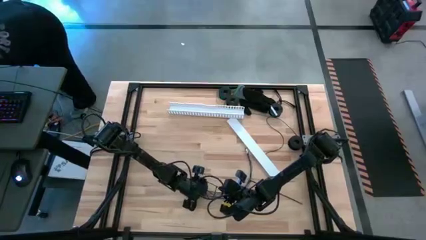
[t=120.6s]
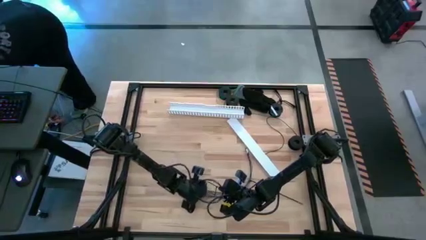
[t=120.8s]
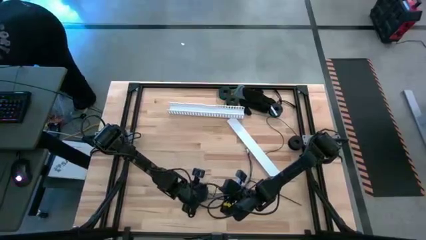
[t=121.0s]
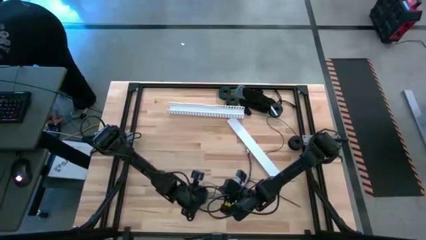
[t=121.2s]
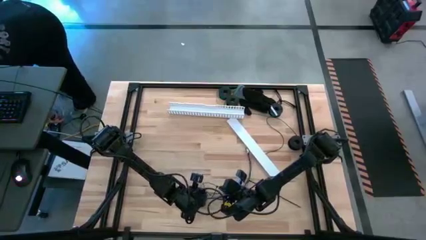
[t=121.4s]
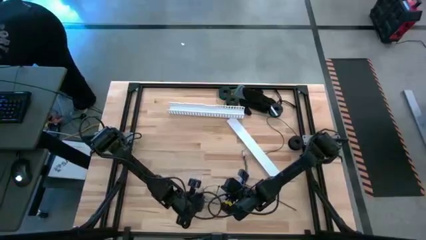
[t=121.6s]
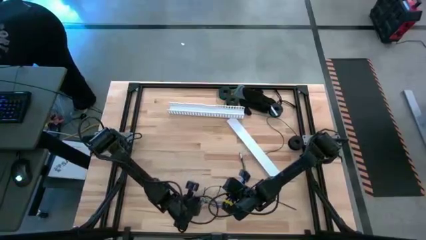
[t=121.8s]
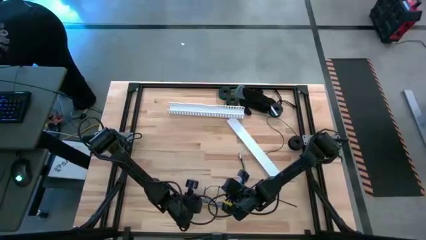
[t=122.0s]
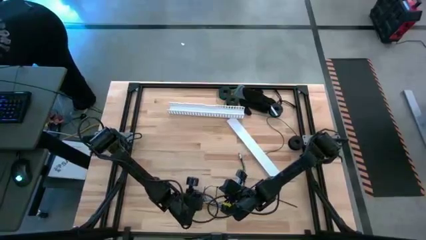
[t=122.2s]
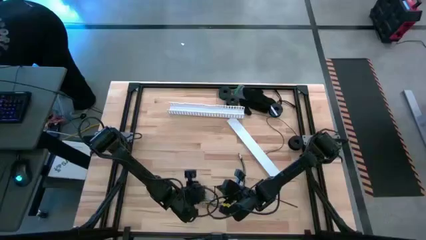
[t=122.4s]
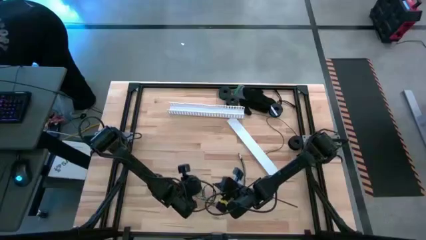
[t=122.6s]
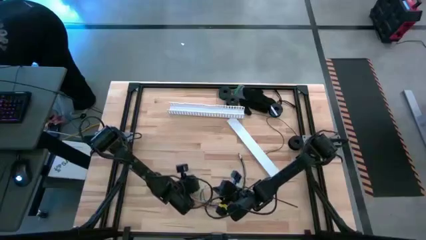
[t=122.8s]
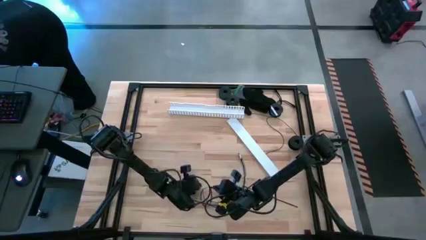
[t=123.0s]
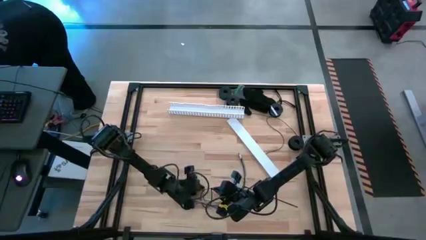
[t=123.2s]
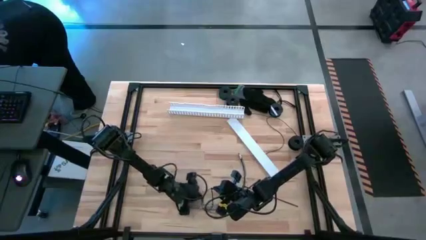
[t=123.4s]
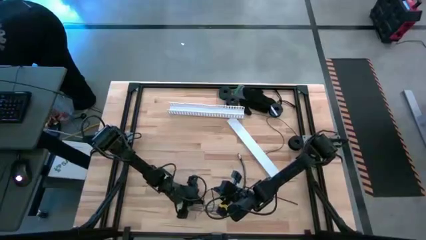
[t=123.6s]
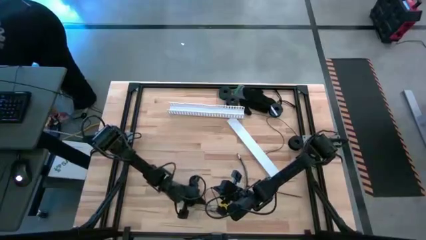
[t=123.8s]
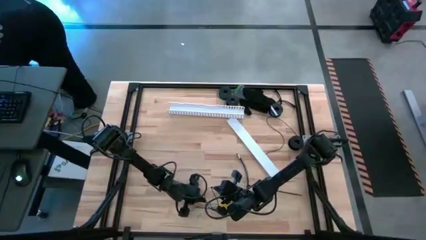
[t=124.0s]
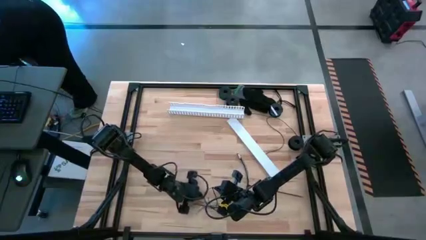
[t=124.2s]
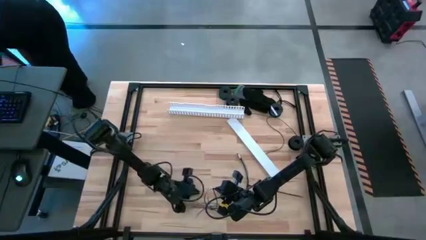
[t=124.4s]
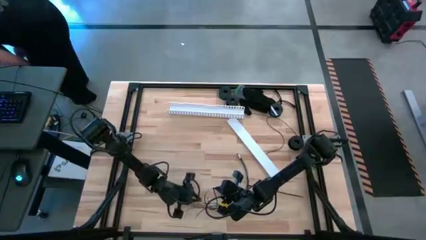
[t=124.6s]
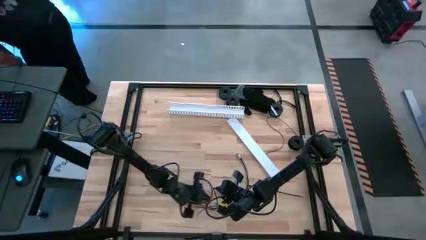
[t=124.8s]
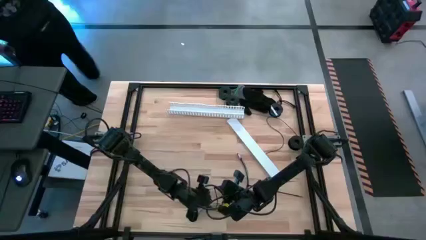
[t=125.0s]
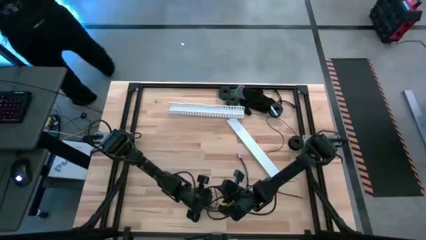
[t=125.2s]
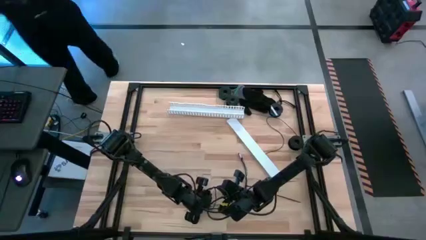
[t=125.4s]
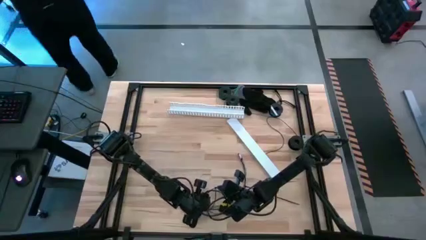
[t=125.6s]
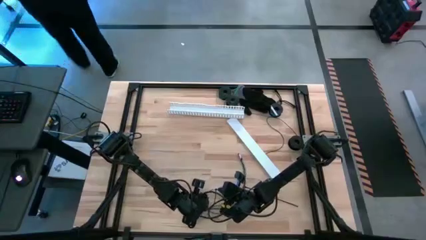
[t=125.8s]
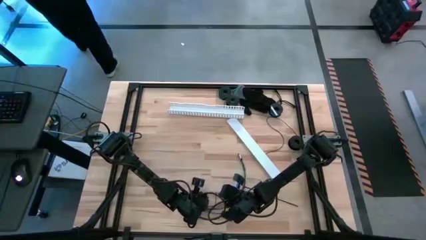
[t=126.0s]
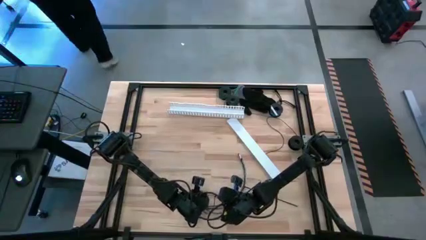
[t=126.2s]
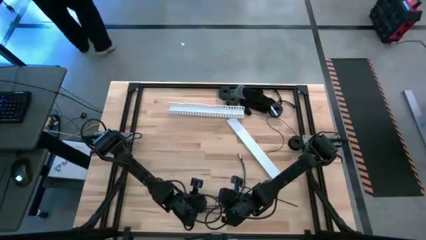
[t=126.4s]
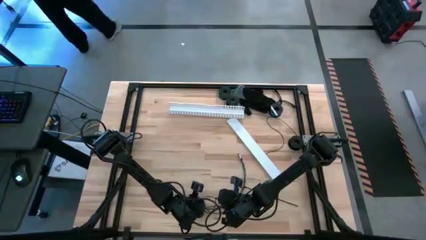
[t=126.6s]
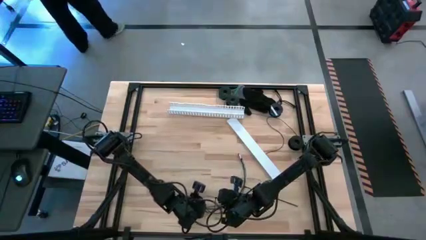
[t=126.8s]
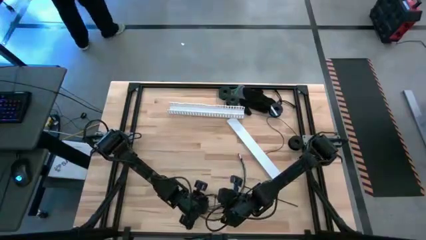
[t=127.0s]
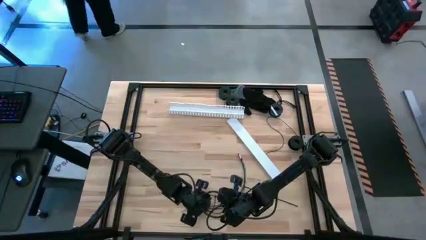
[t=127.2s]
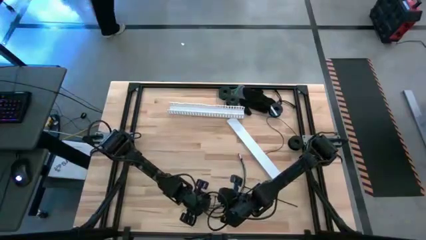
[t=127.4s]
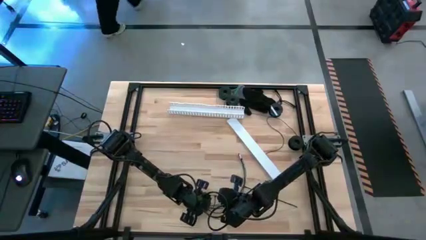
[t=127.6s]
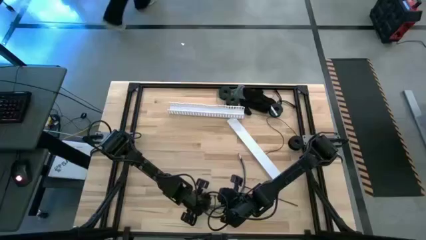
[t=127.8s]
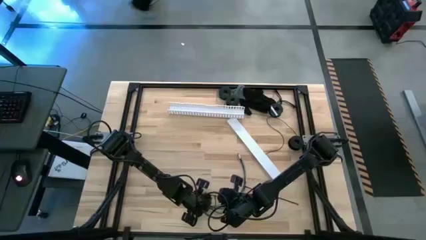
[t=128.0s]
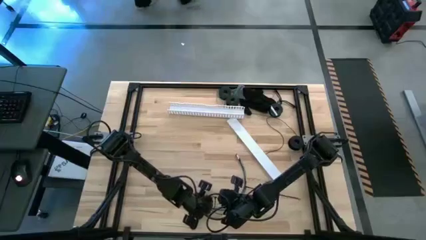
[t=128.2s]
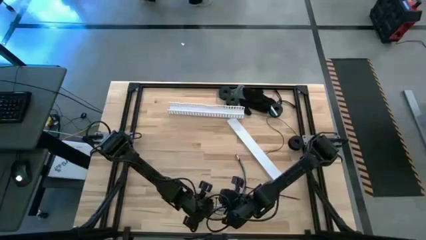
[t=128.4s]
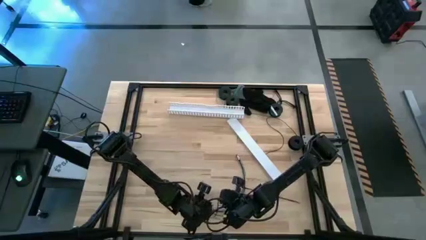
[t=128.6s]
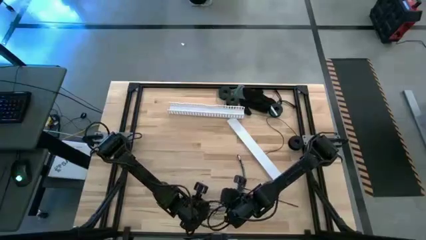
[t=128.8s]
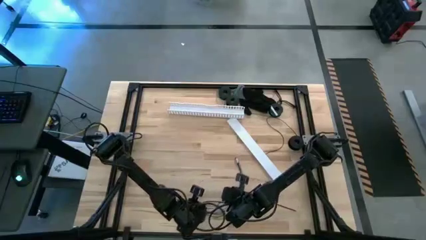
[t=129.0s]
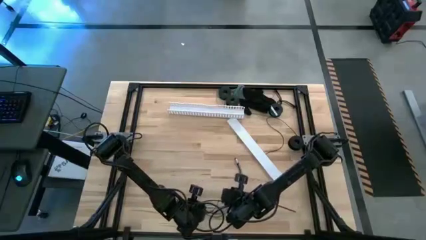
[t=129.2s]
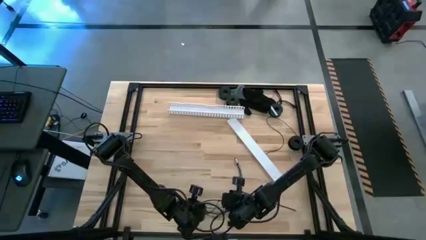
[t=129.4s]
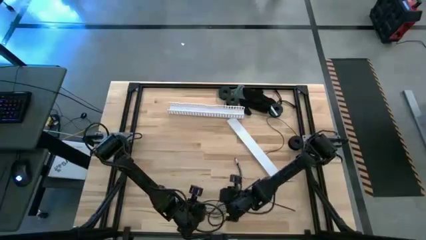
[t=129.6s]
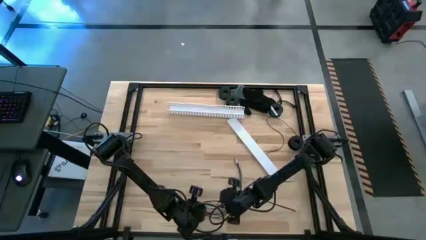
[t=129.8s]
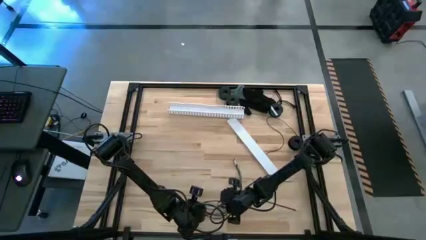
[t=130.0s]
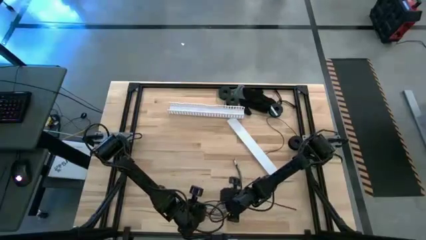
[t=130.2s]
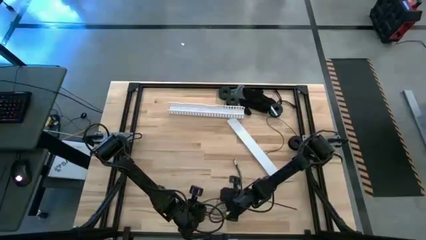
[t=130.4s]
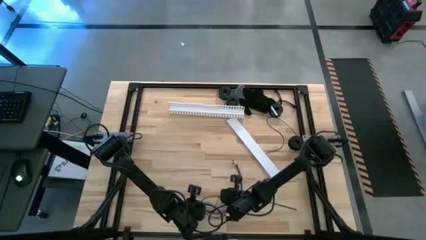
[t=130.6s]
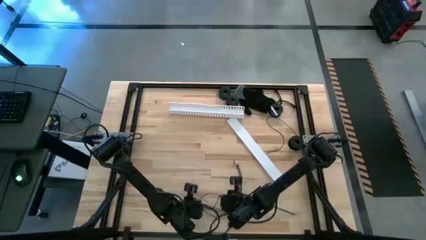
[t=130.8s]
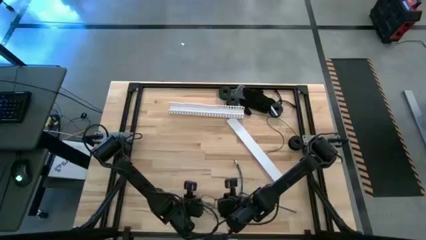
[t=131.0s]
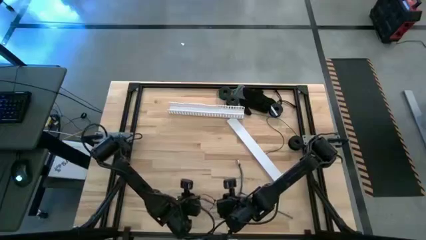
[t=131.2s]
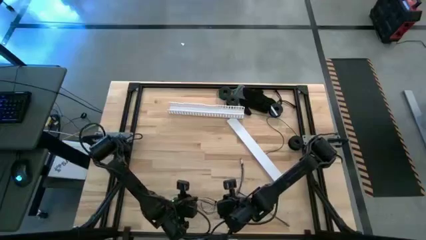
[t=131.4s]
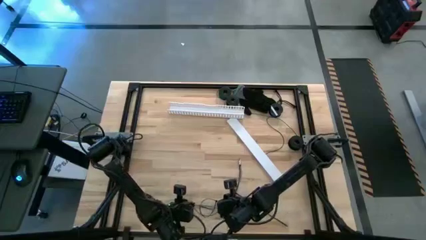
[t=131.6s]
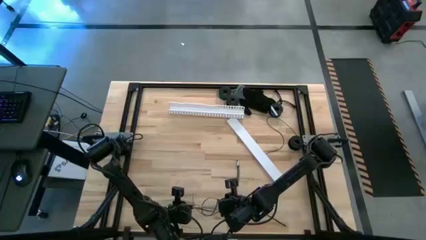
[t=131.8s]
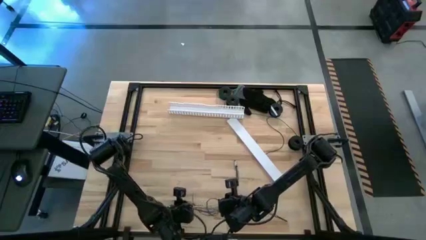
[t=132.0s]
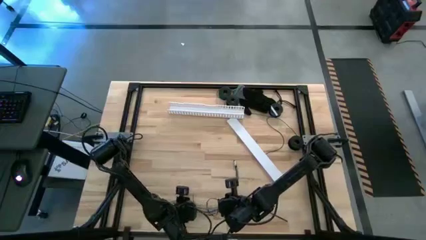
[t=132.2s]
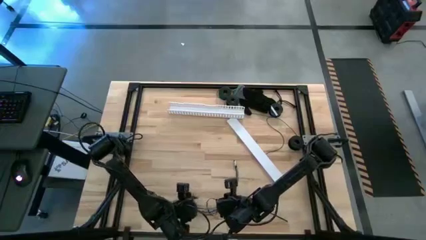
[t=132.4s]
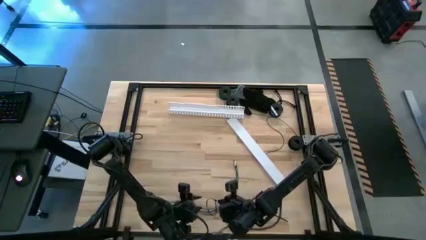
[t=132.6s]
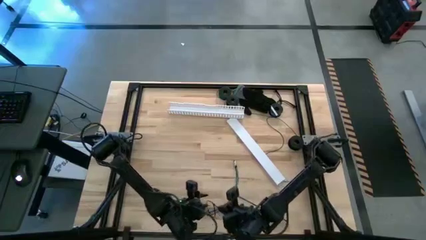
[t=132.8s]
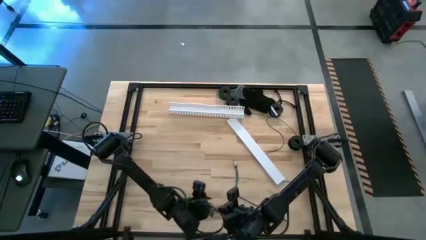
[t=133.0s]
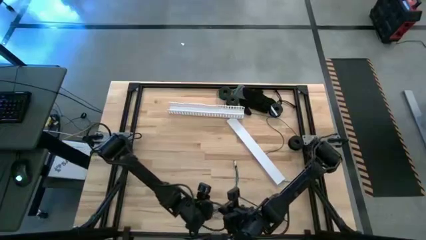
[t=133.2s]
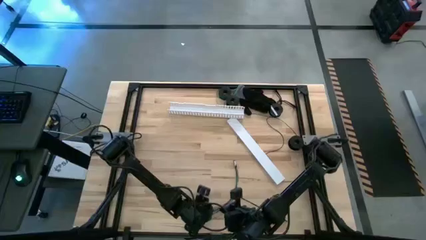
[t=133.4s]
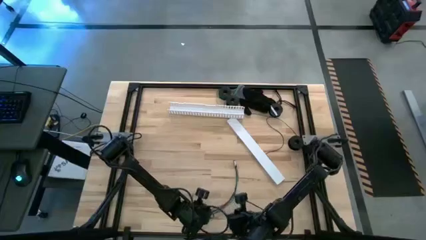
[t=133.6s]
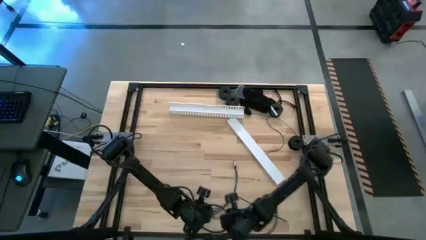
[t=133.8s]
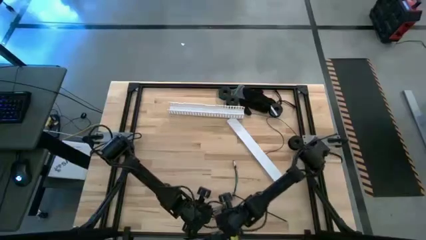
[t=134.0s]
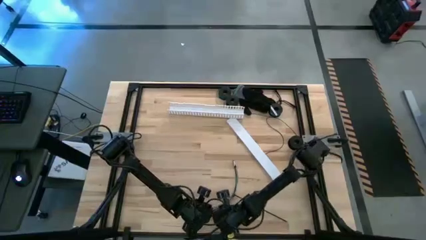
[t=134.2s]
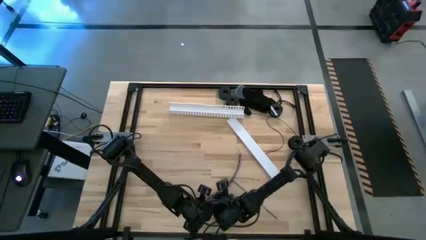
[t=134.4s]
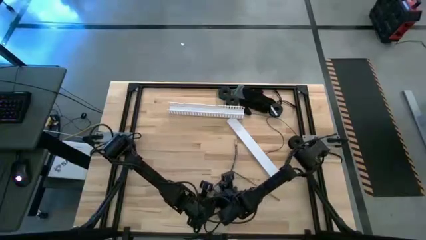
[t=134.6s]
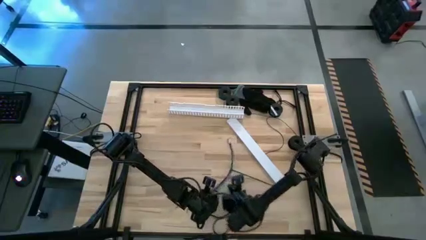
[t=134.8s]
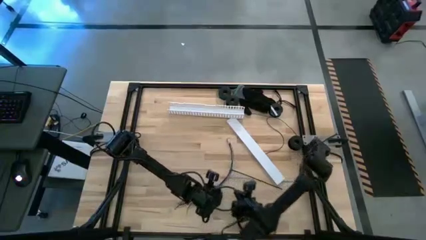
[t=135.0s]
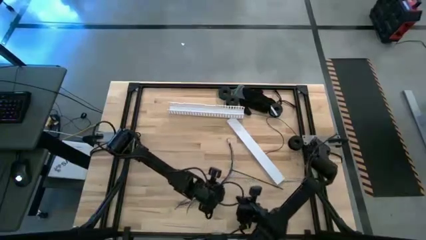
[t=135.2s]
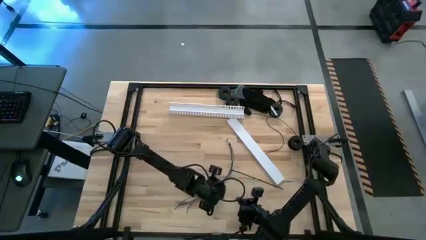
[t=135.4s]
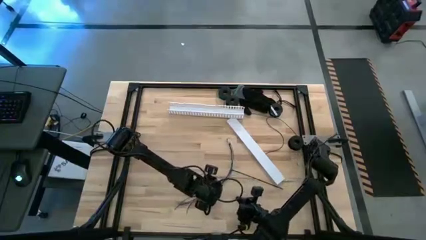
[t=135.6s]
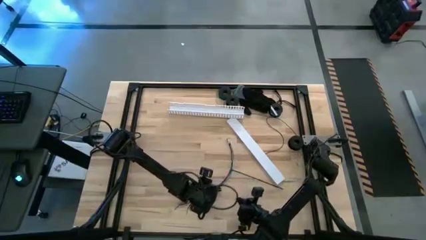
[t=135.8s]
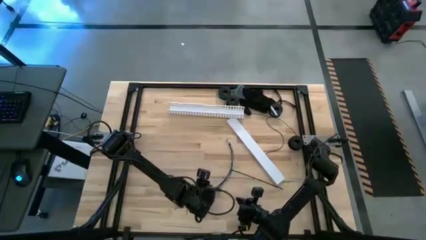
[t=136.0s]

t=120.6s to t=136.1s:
Task: Ziptie cables
Wrap the wire cables with the black zip tie
